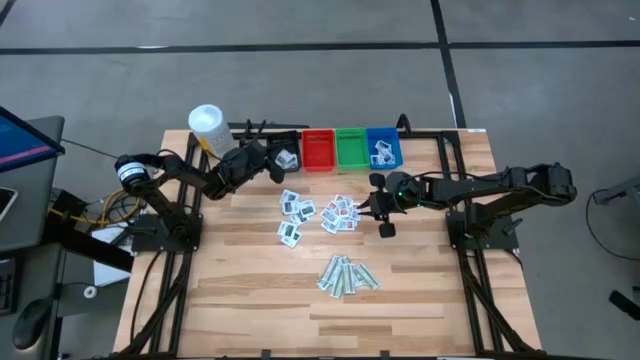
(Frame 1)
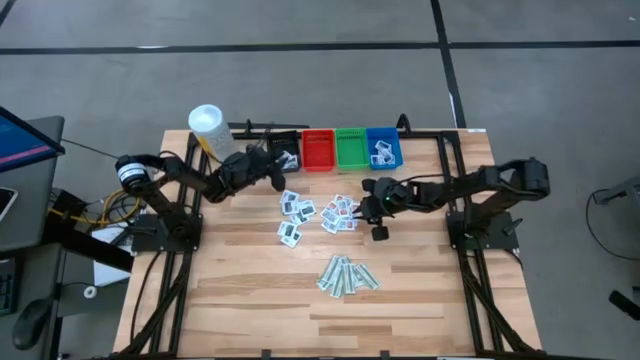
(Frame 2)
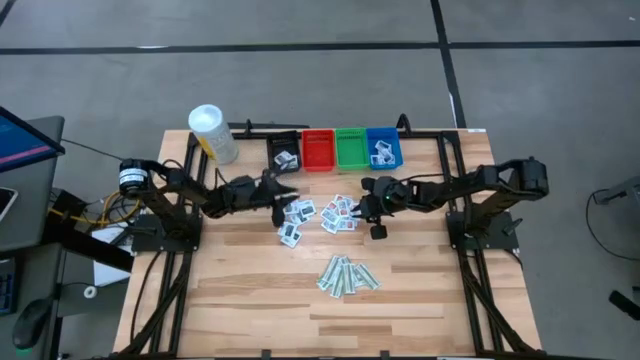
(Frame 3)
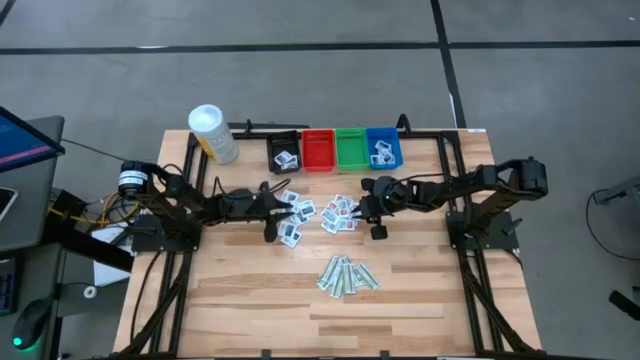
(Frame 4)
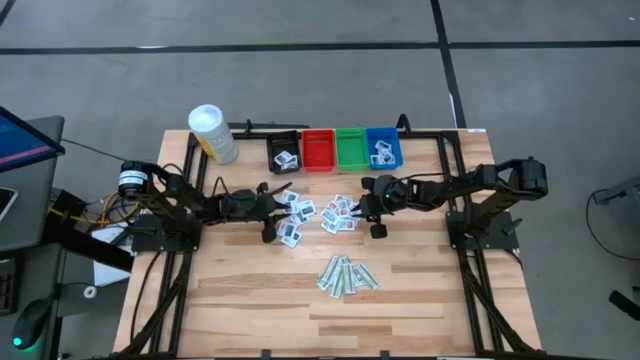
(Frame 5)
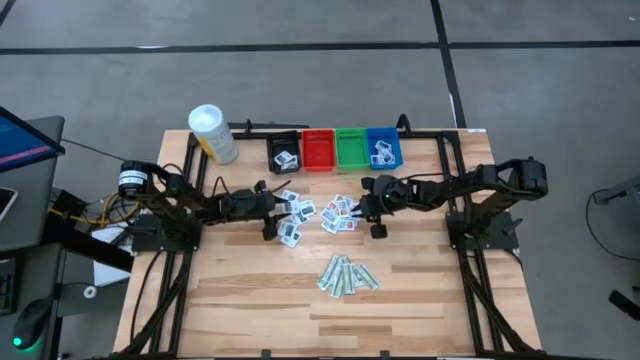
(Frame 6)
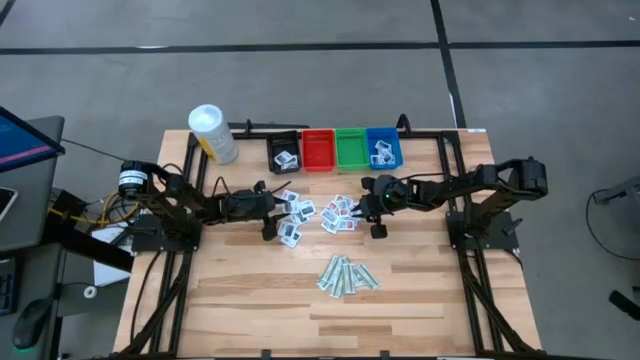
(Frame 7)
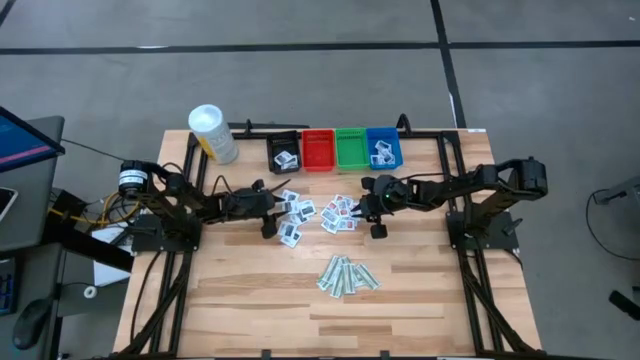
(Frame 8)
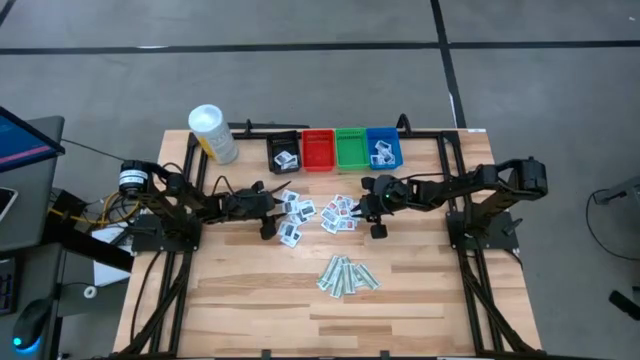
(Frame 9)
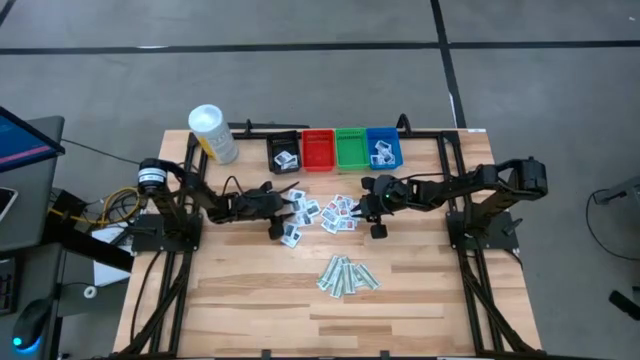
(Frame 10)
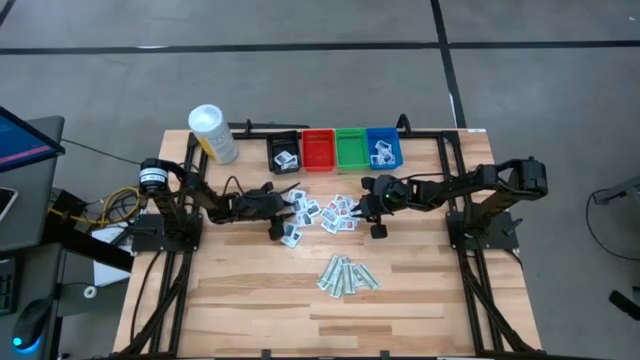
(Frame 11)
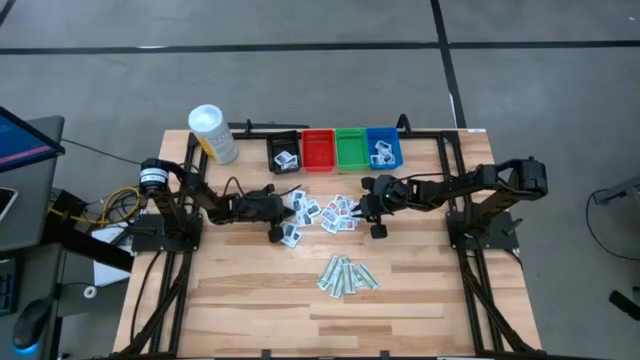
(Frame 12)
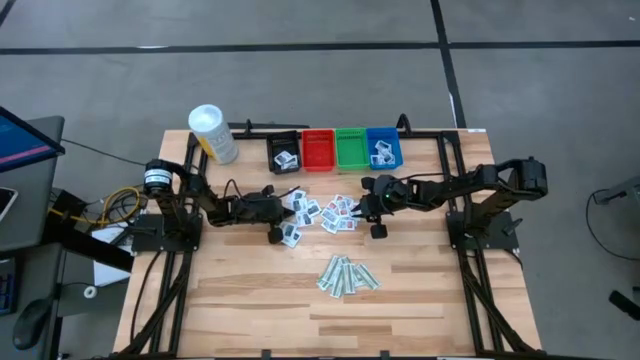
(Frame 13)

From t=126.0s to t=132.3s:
Task: Pick & Place First Aid Supplies
Put the black towelette pack into the black bin

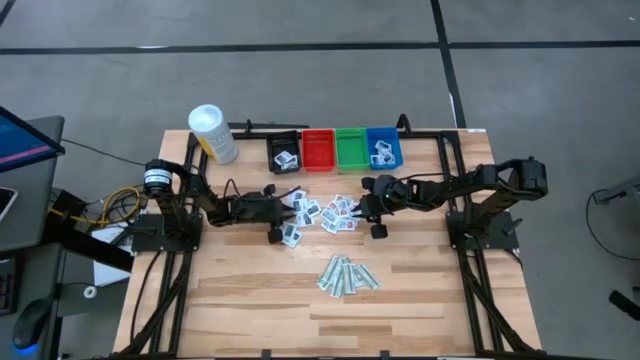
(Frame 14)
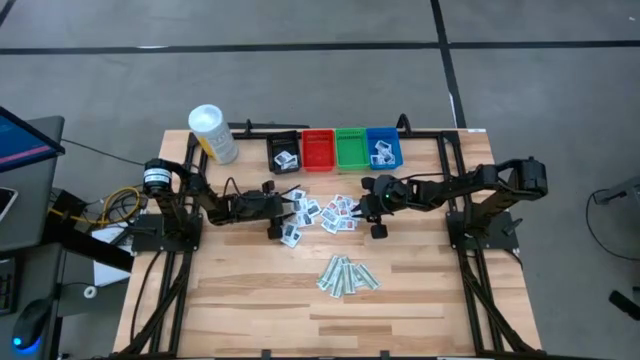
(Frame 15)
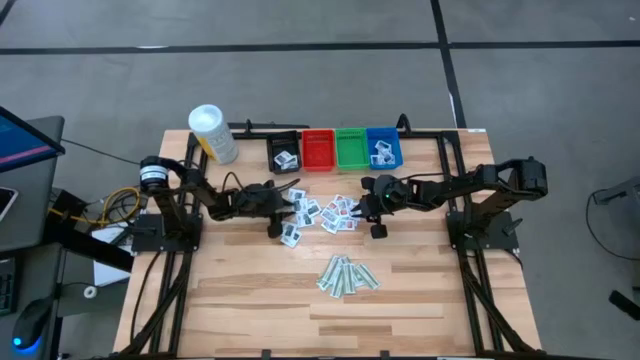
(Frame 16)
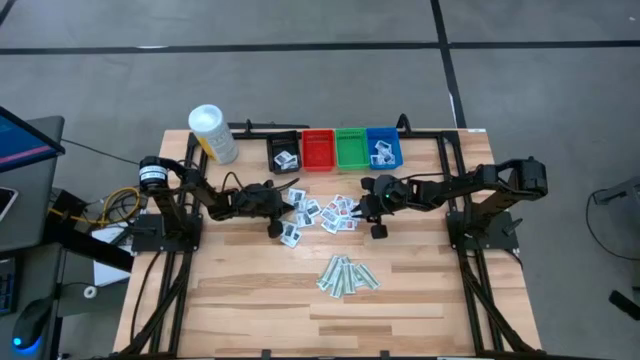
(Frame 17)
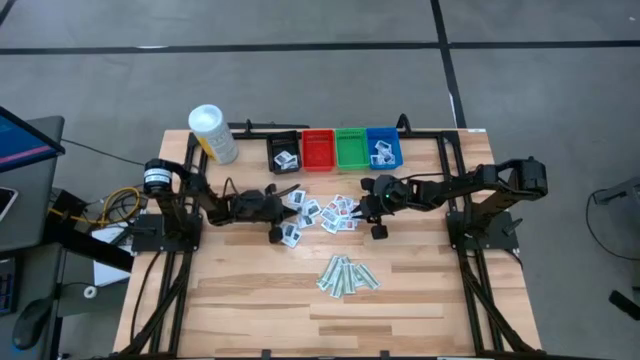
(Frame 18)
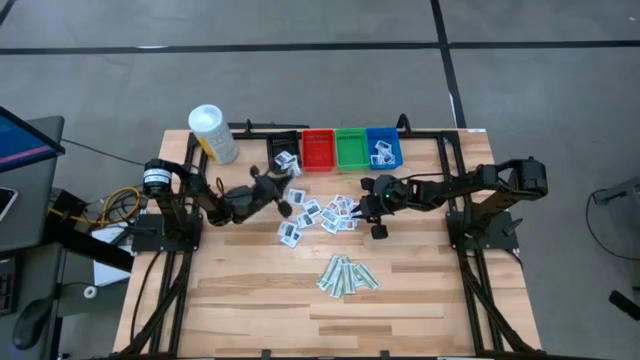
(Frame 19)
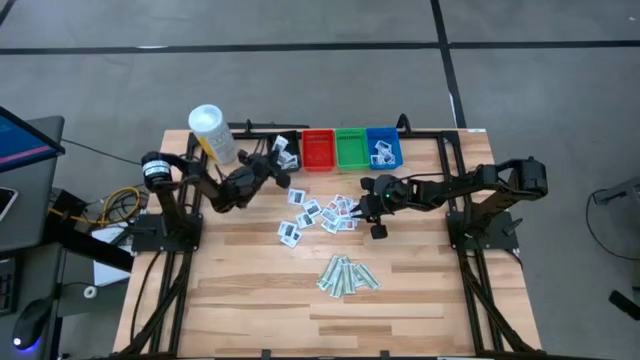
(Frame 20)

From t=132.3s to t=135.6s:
Put the black towelette pack into the black bin

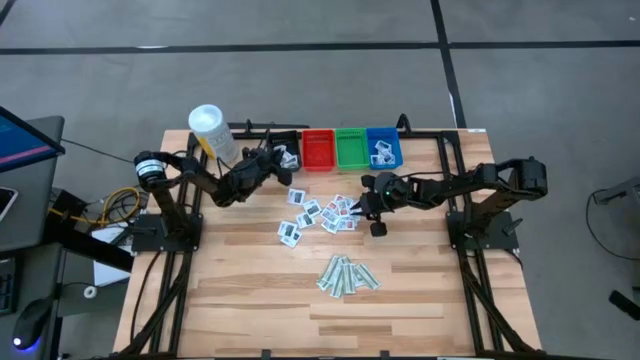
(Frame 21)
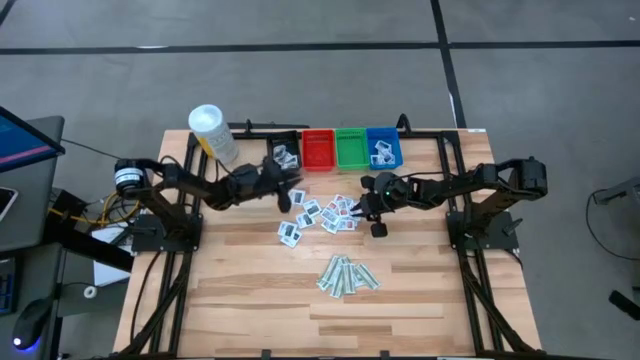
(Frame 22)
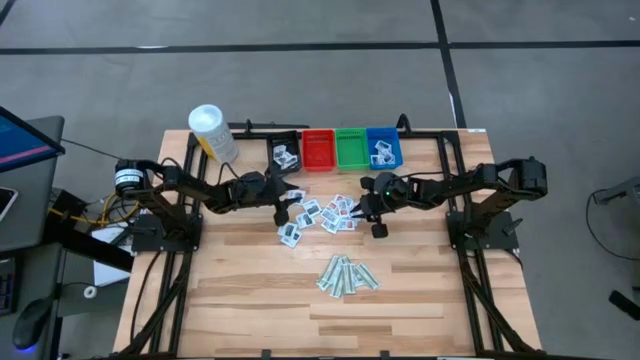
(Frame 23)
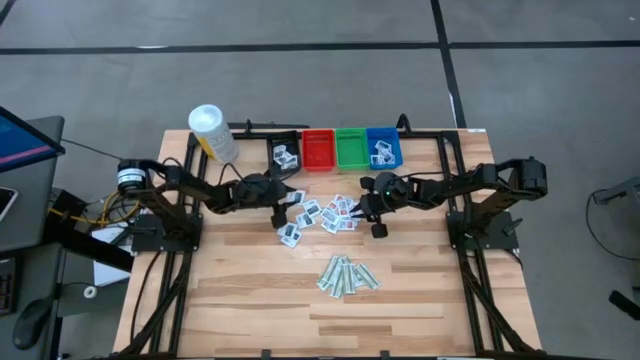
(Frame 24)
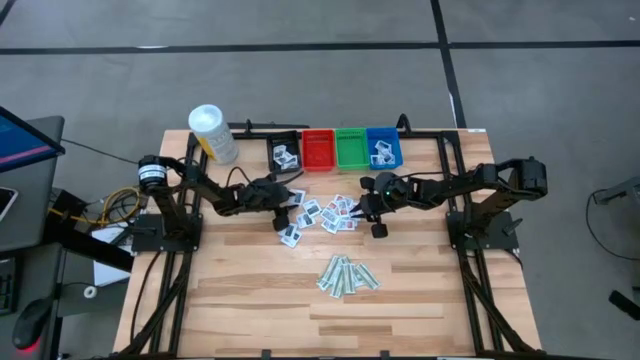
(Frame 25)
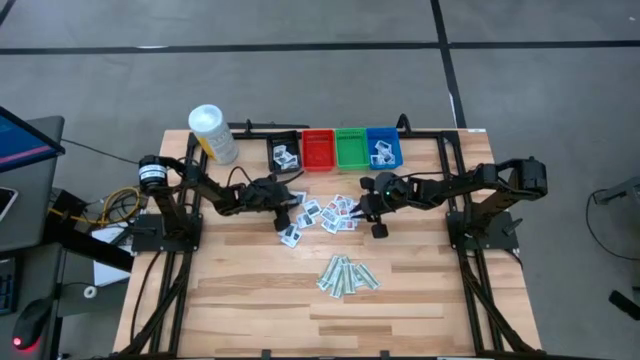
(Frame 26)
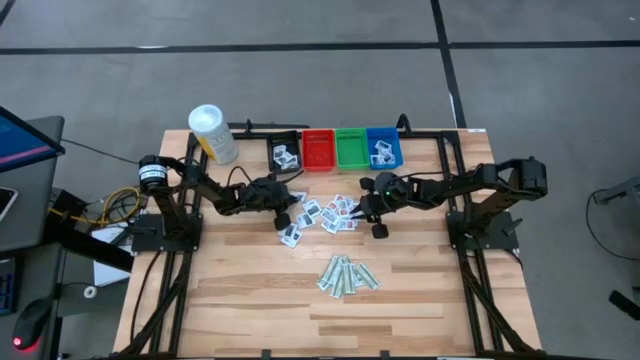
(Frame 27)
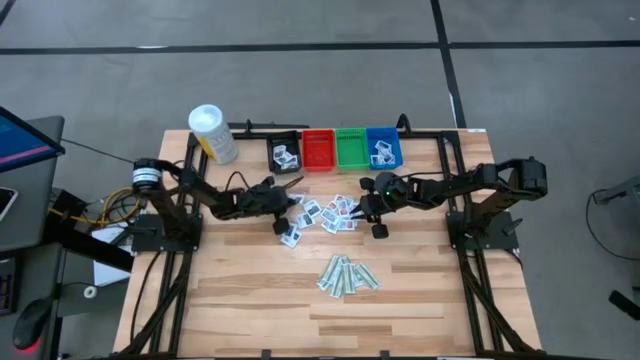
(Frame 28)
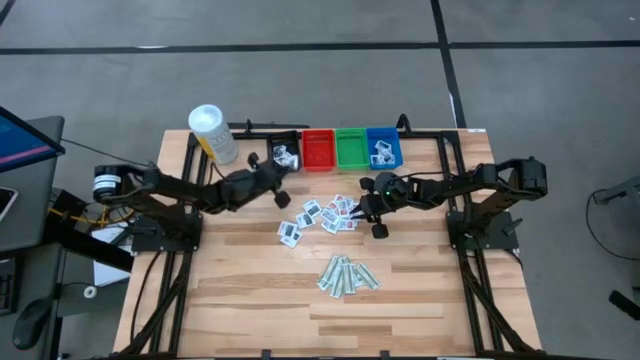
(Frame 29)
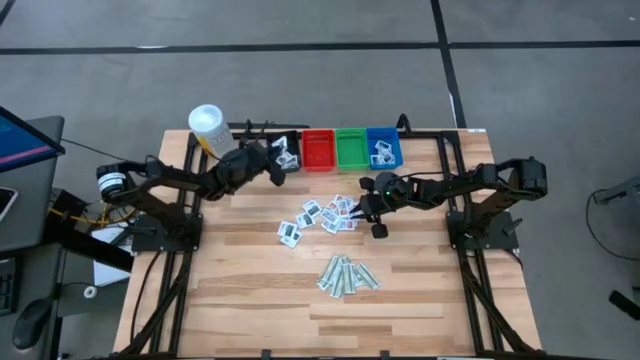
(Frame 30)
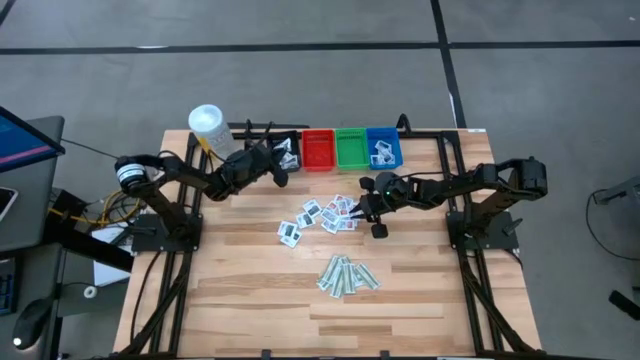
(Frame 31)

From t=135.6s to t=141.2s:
Put the black towelette pack into the black bin

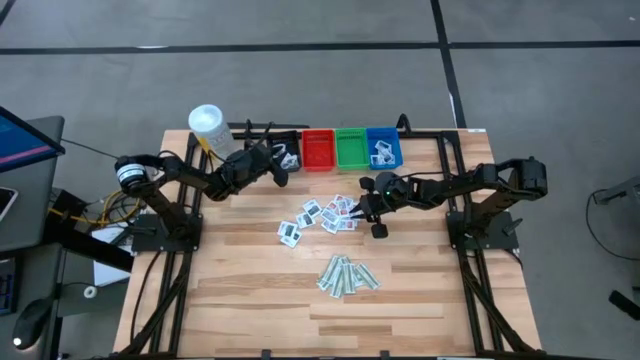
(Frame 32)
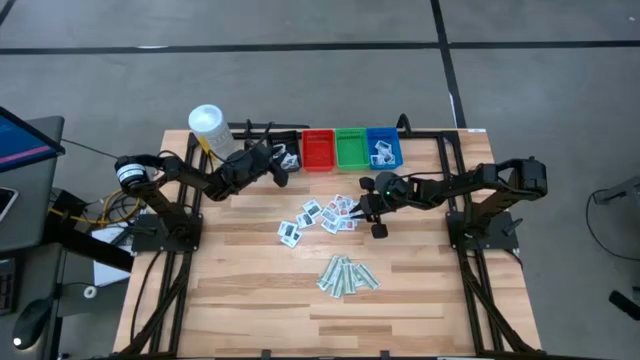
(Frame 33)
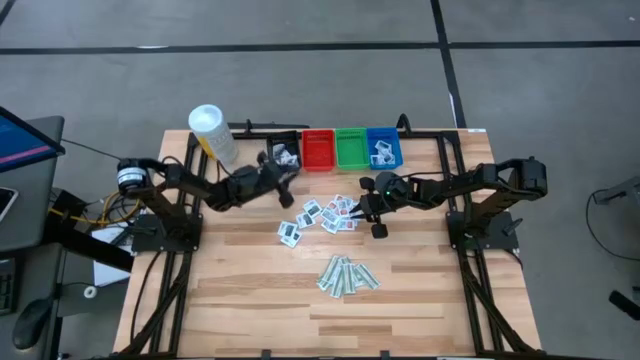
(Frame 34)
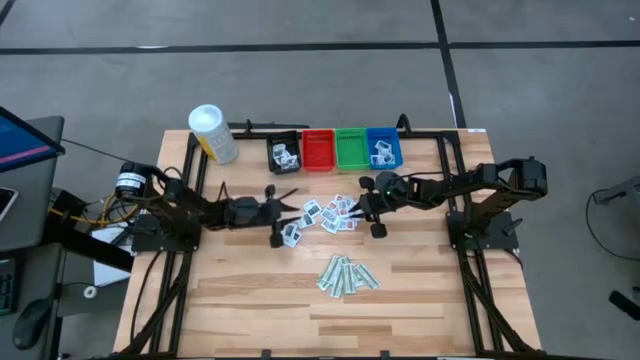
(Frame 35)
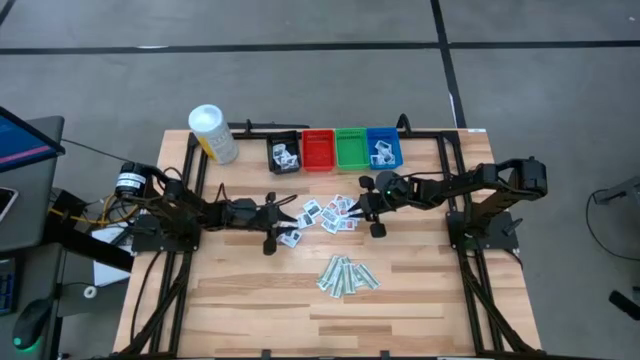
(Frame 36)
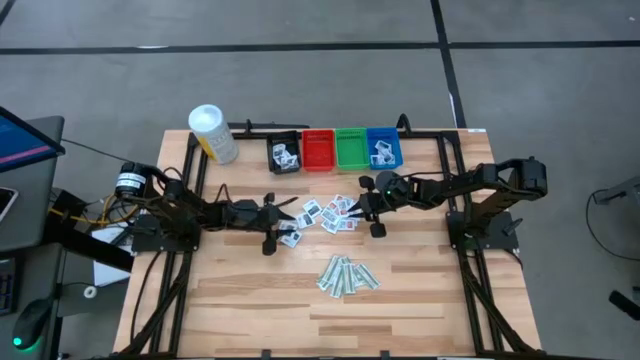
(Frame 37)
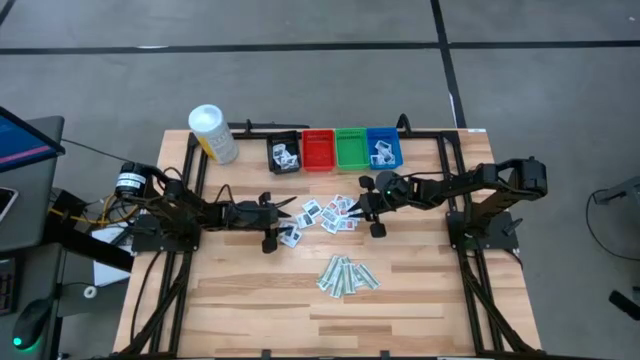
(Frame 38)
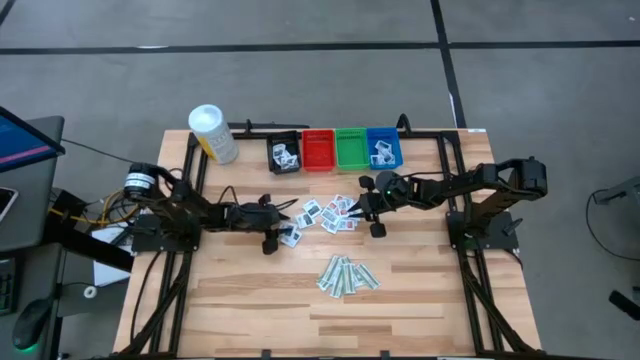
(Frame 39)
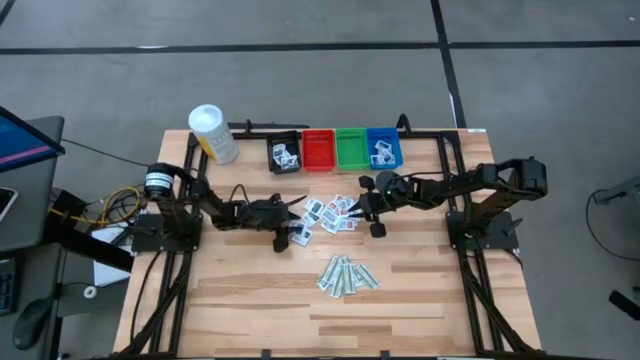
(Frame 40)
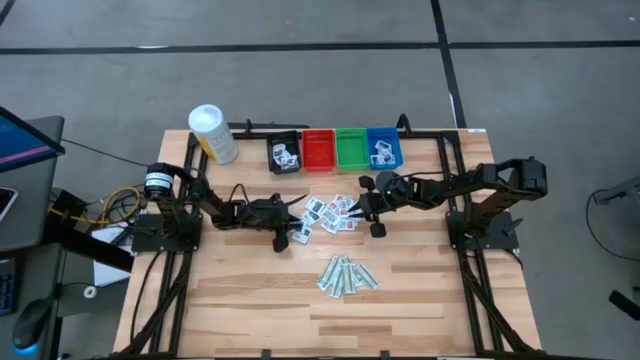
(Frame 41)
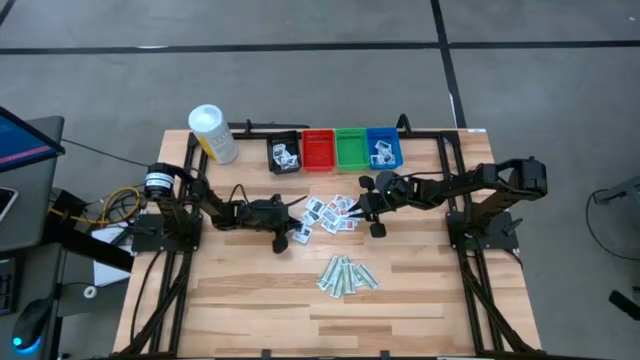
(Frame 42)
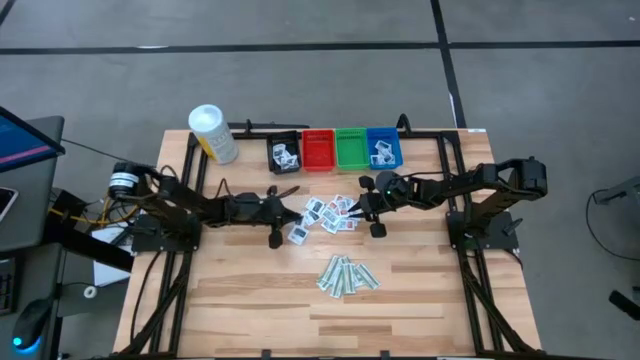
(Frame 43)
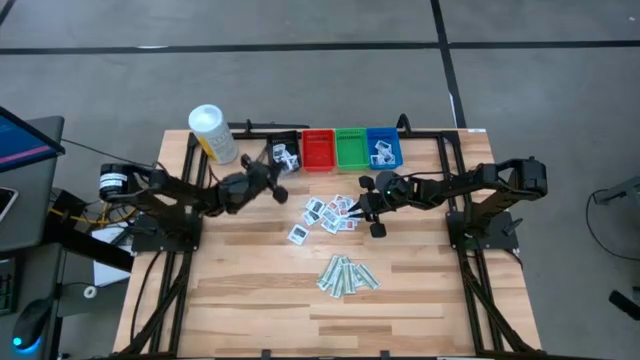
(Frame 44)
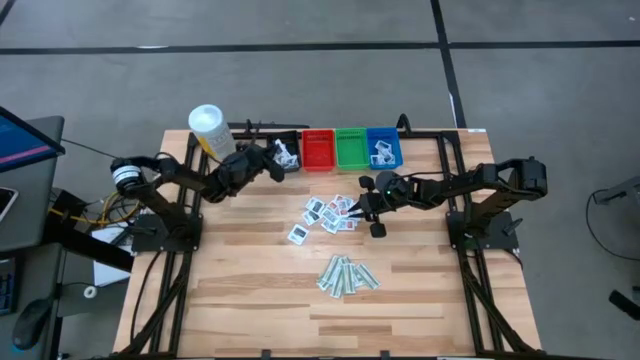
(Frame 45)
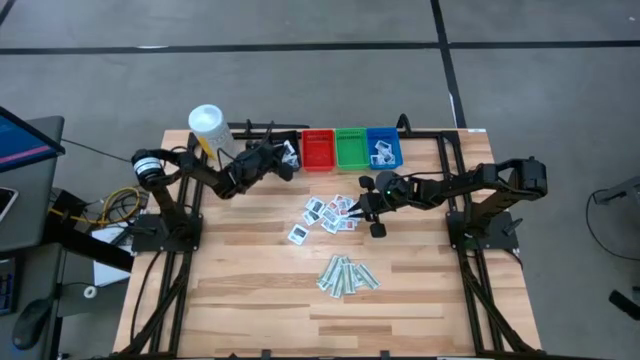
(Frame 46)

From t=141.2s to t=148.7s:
Put the black towelette pack into the black bin
